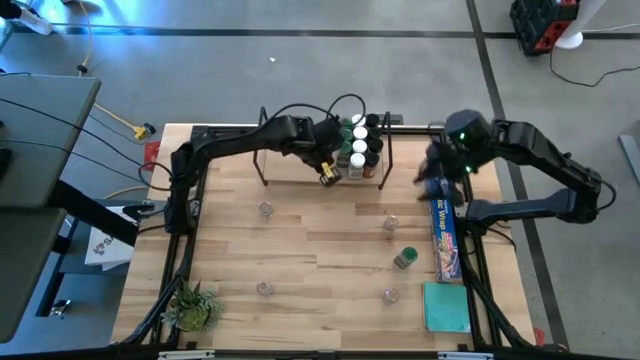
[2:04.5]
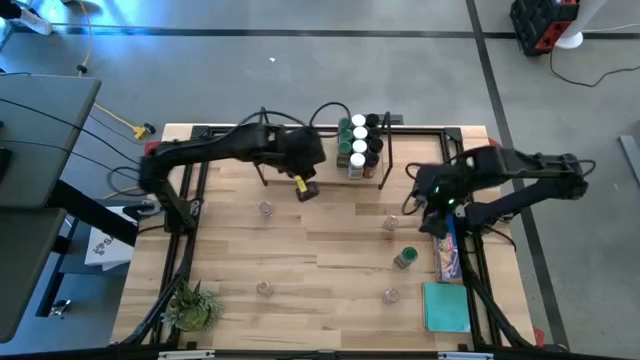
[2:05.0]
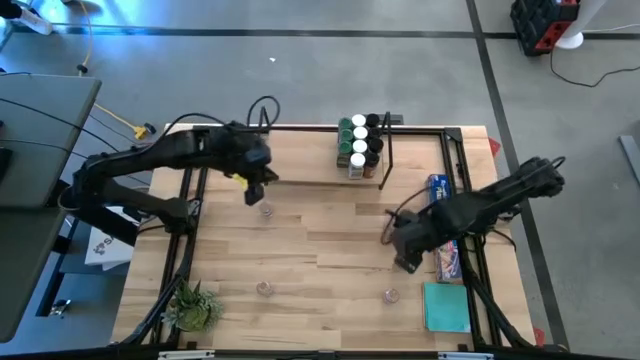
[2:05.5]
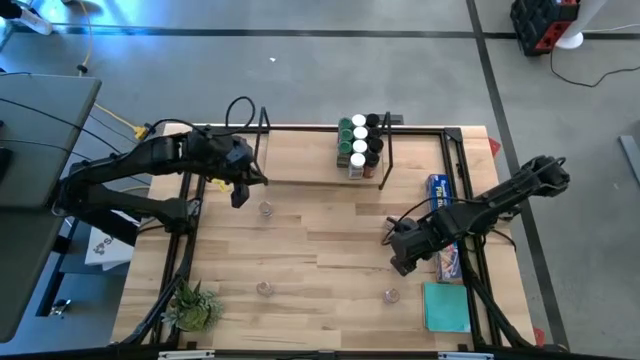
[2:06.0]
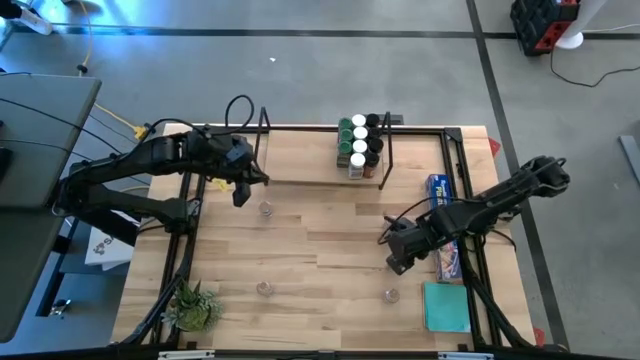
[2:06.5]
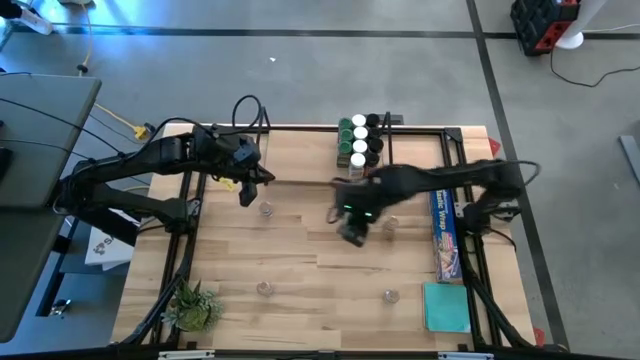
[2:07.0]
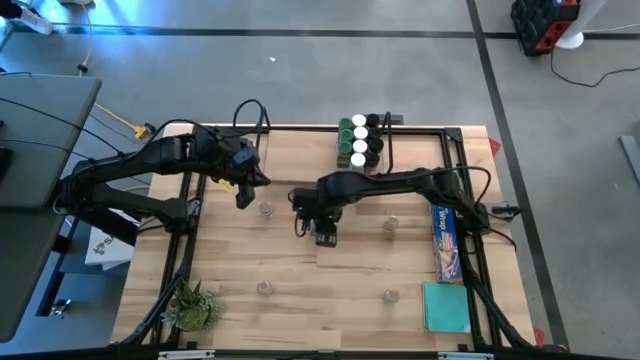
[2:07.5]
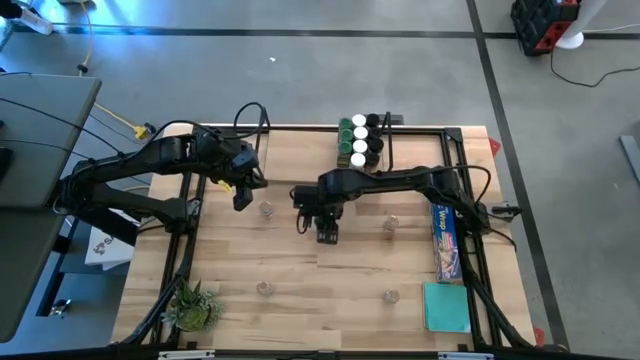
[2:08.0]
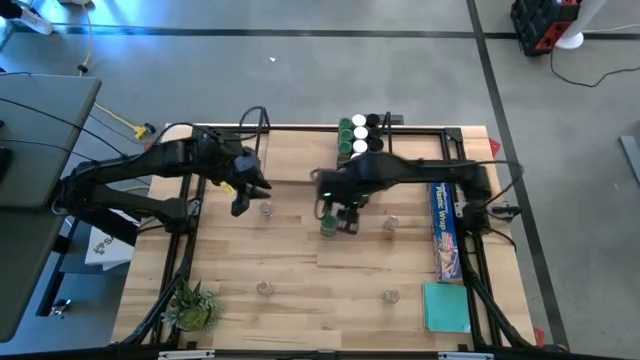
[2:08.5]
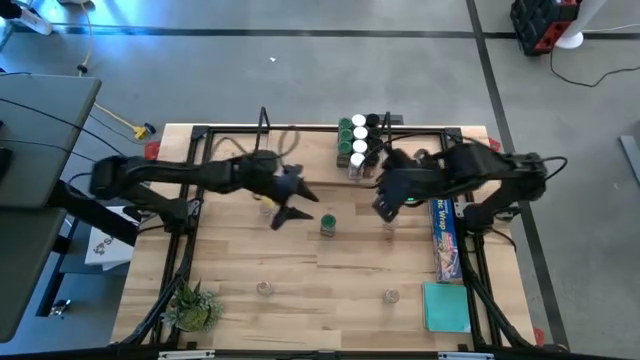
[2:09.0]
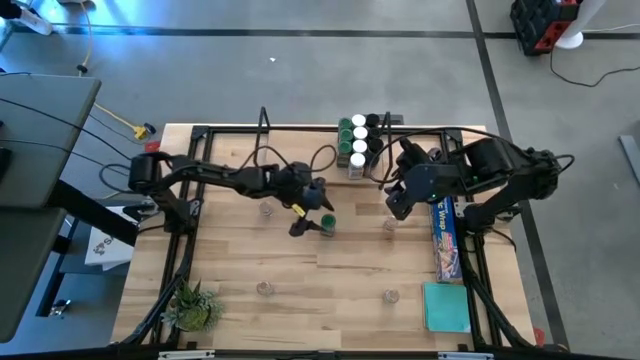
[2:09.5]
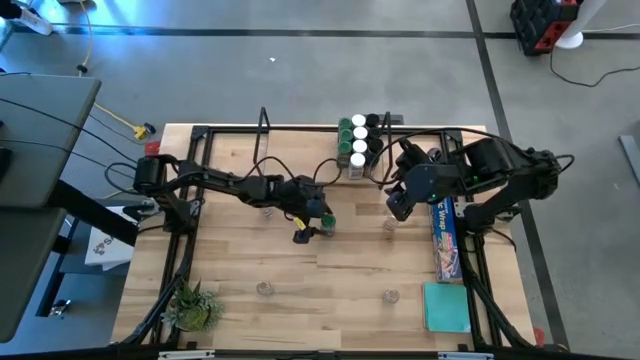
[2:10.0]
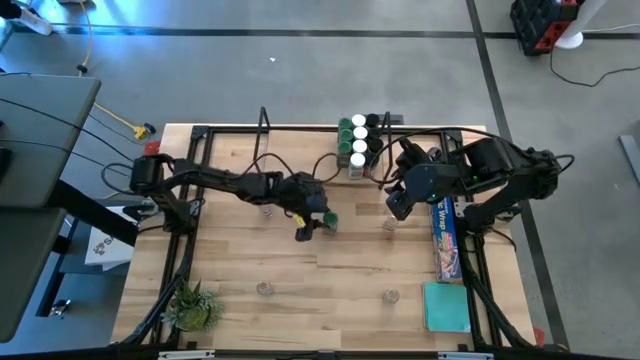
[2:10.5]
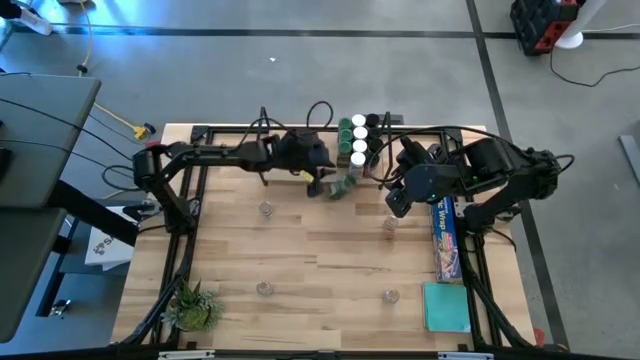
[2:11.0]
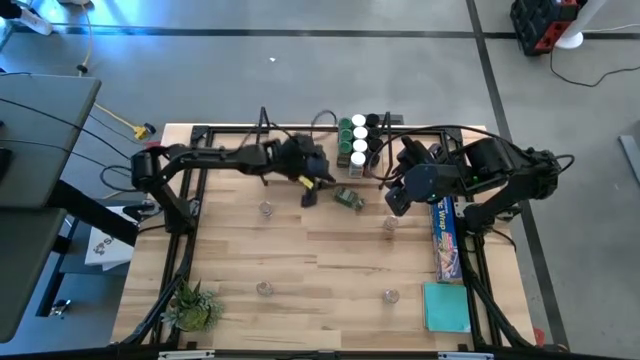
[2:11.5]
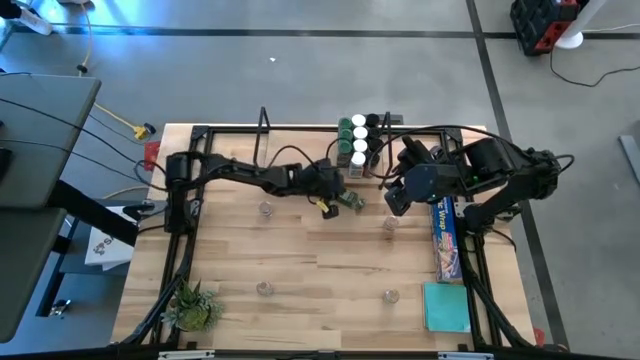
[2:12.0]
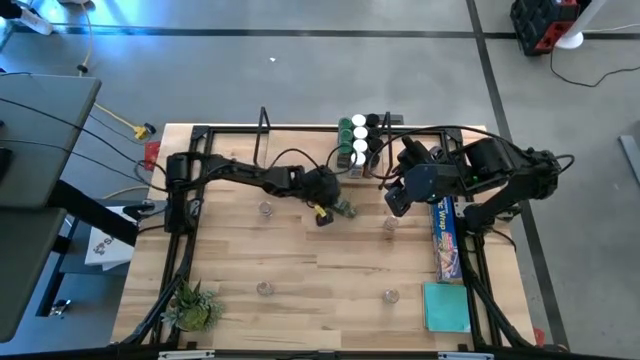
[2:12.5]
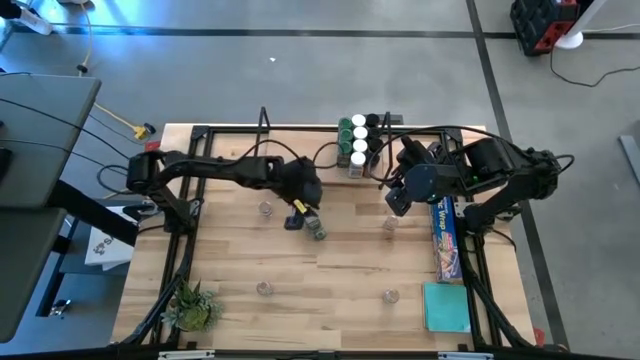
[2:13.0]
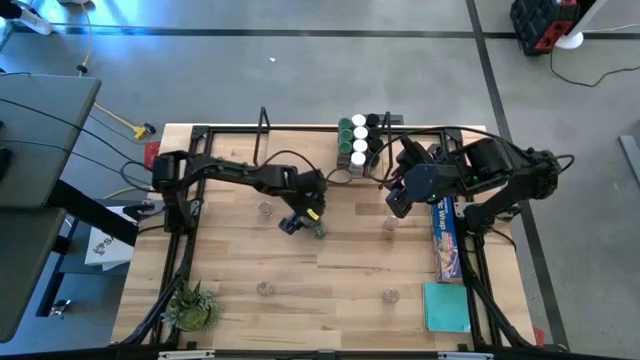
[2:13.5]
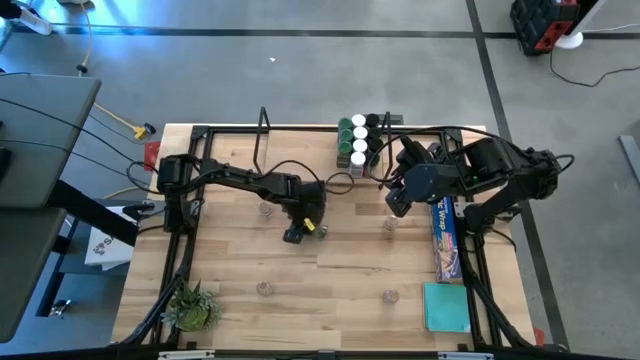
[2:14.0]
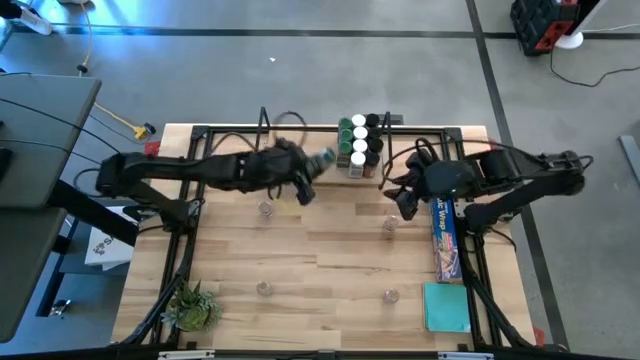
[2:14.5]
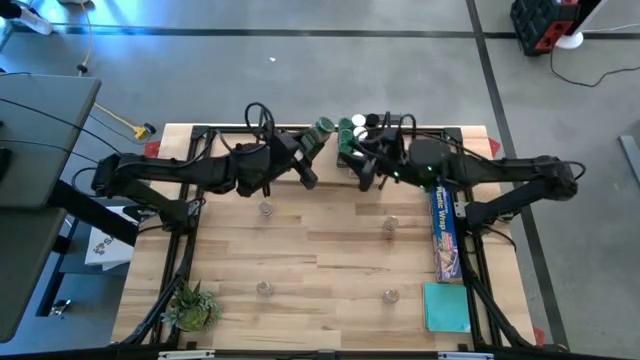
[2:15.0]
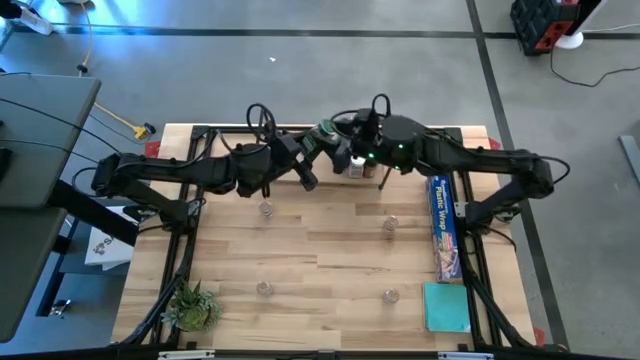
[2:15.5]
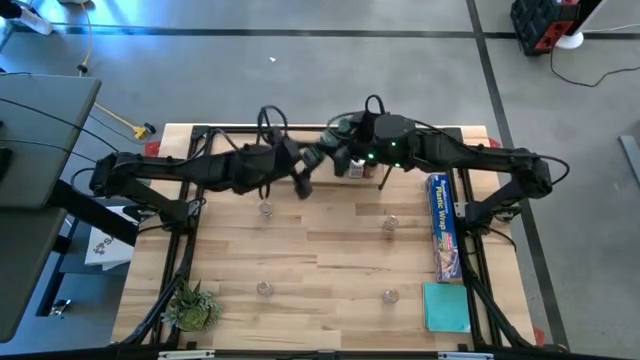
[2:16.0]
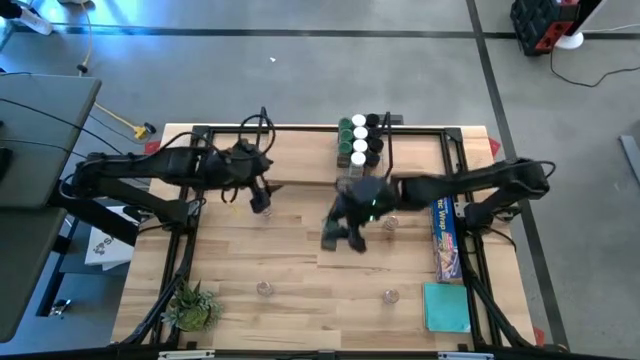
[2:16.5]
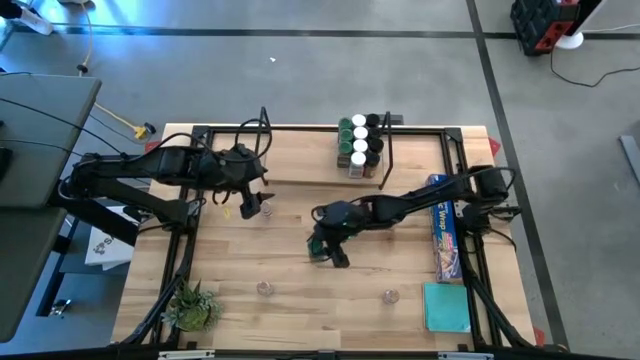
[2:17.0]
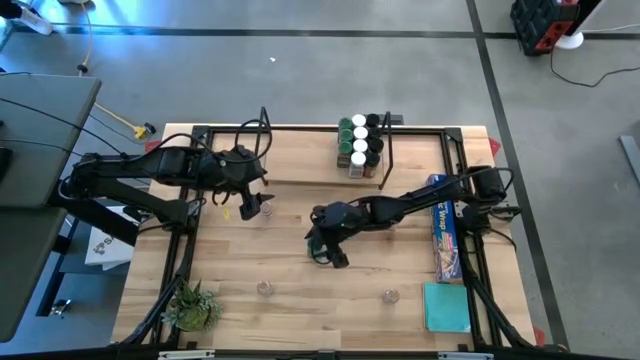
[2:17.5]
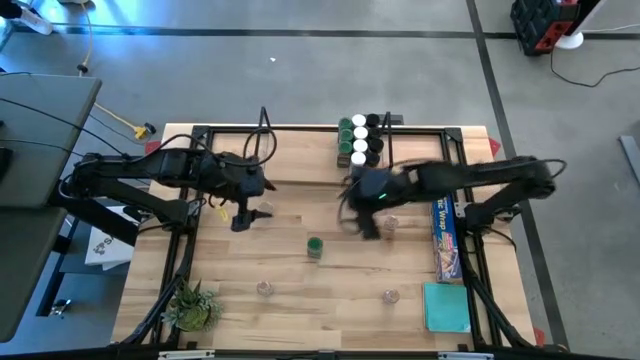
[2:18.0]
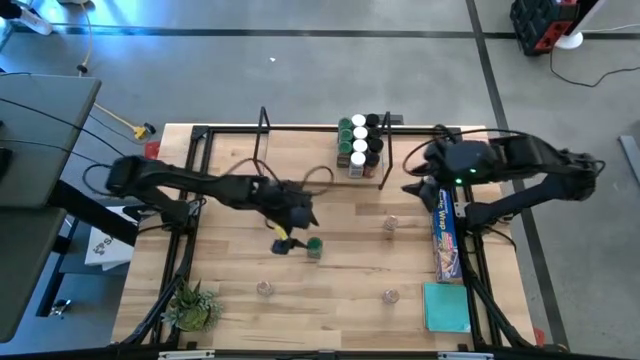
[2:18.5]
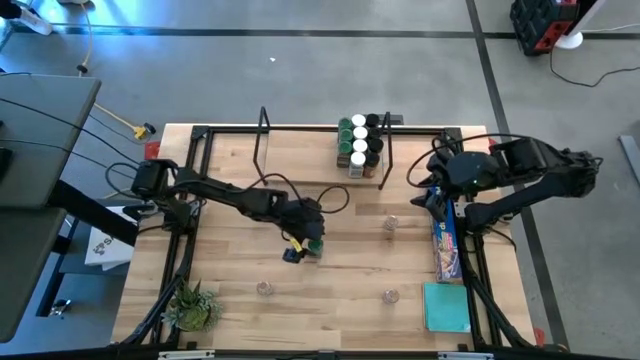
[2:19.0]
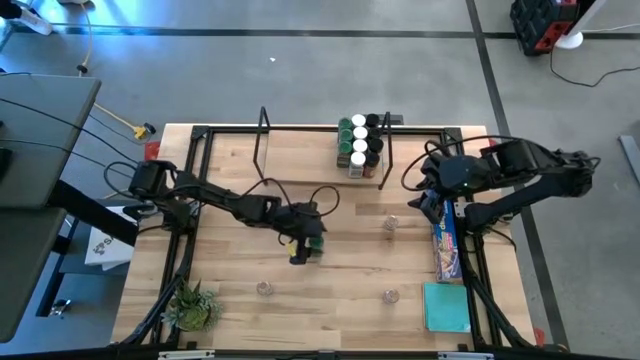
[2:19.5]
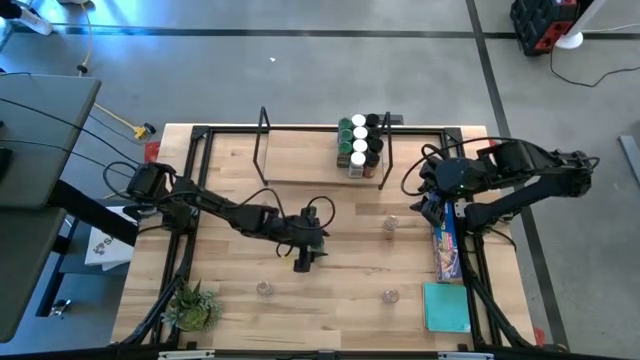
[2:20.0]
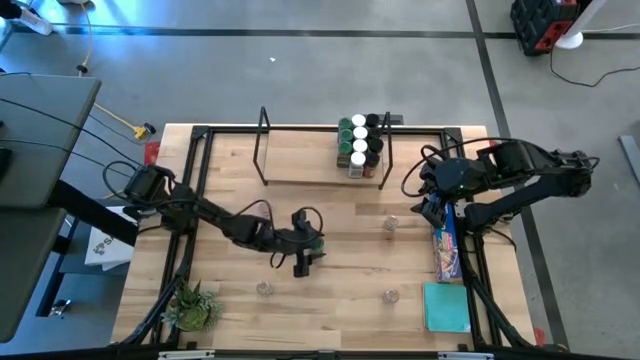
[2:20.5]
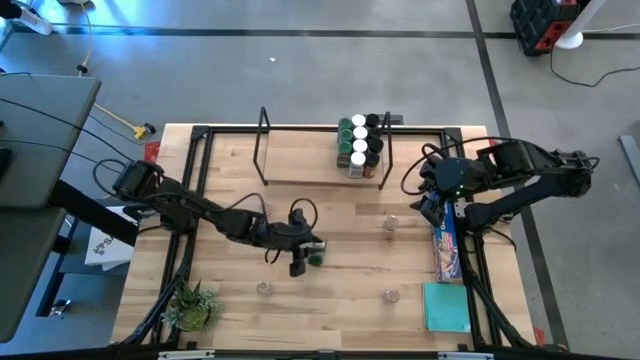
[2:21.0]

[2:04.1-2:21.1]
Task: Shelf spices
Put the green seasoning bottle on the shelf aligned with the other green seasoning bottles

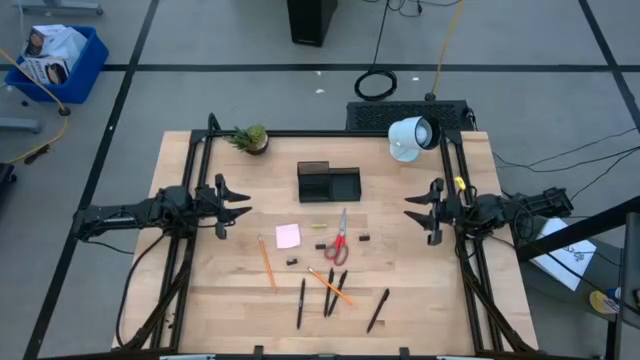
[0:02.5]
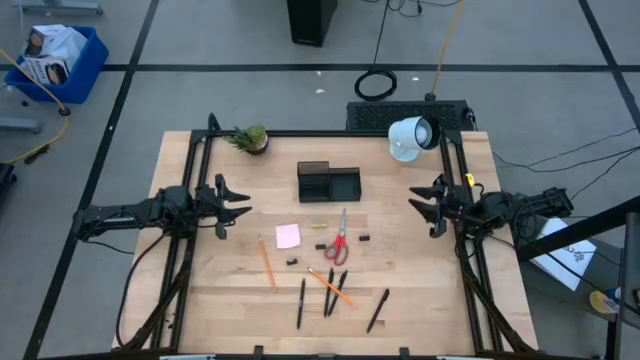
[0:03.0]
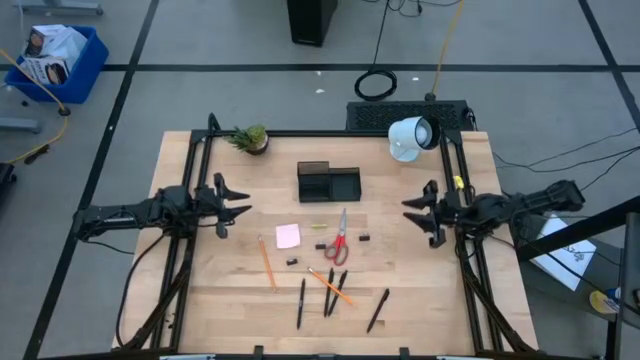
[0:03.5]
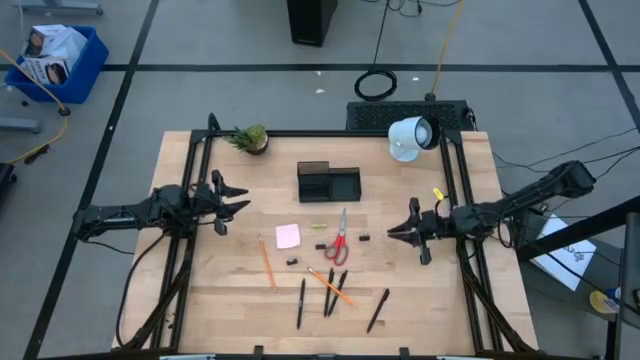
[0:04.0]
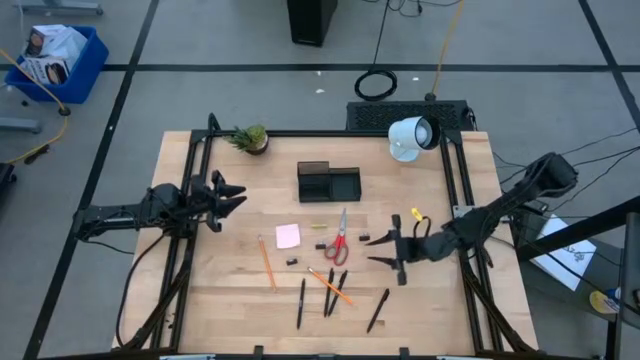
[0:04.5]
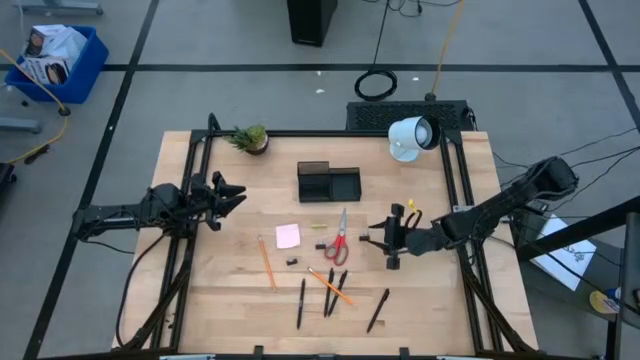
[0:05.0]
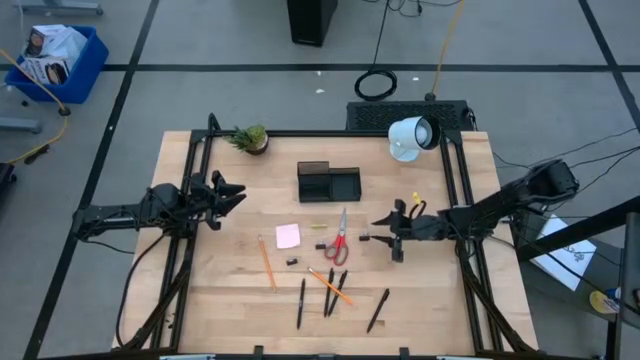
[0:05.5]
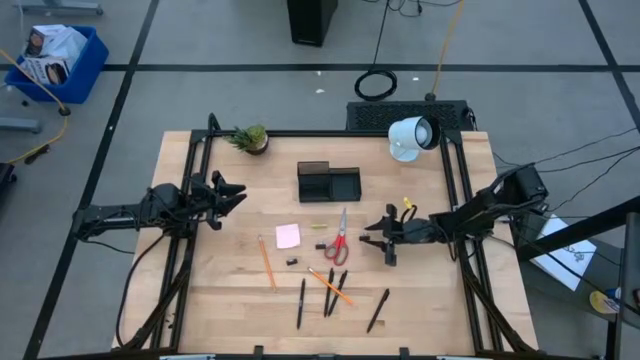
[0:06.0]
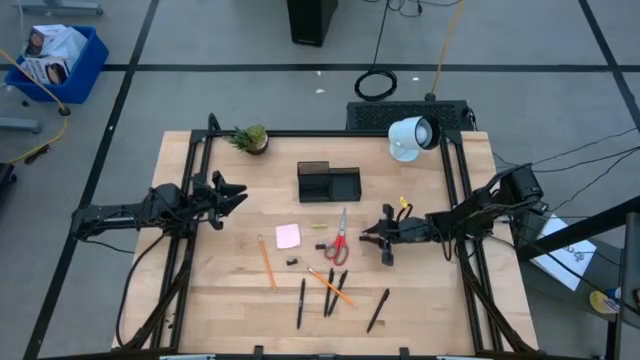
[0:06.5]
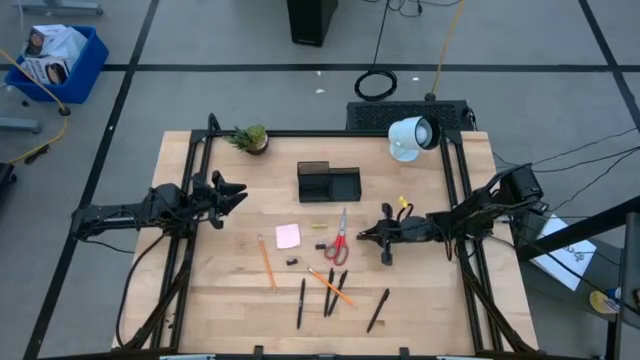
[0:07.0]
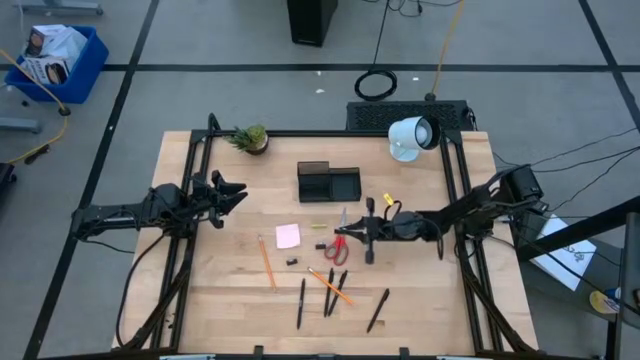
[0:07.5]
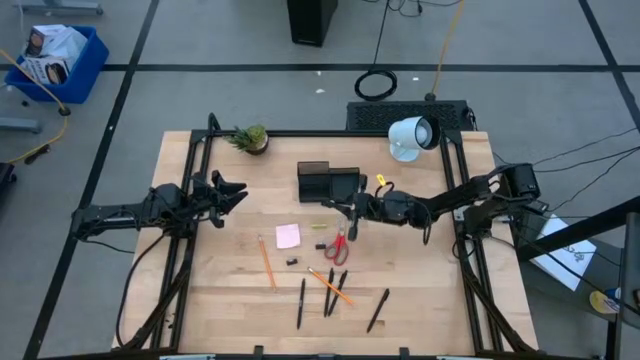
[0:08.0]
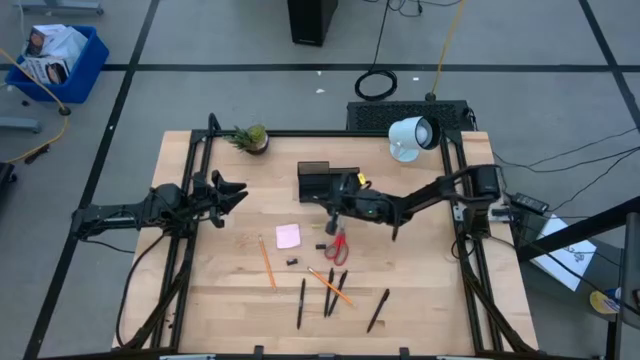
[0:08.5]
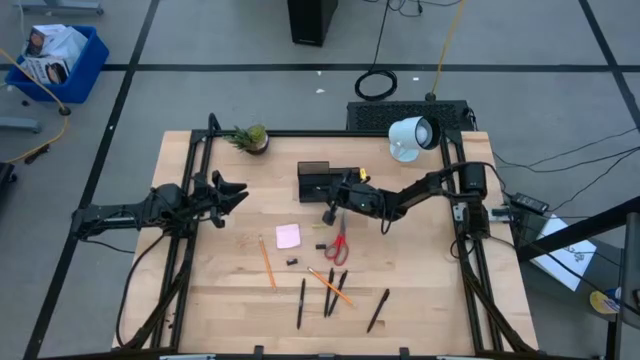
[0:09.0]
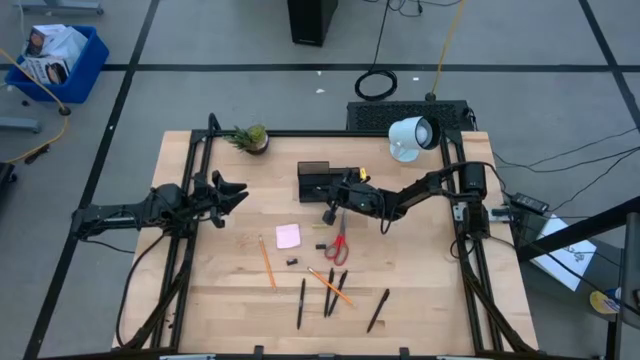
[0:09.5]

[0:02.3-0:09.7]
Task: Pick and place office supplies into organizer
Put the right binder clip into the mesh organizer
